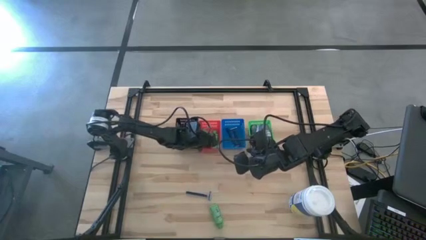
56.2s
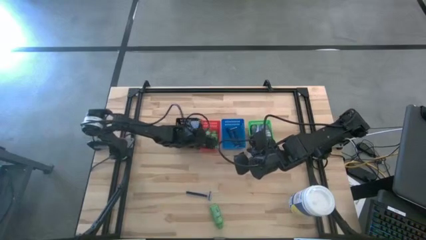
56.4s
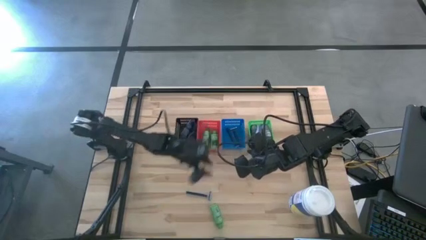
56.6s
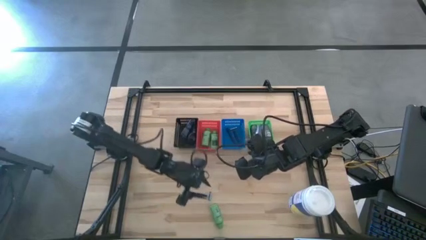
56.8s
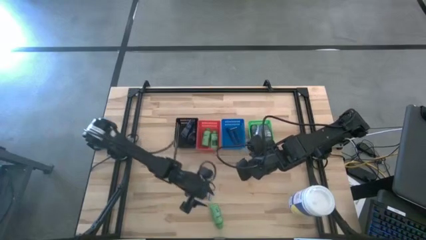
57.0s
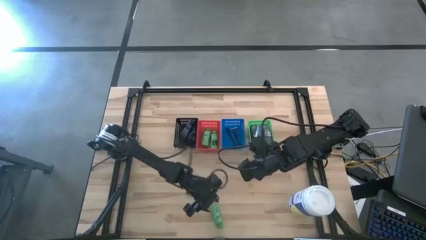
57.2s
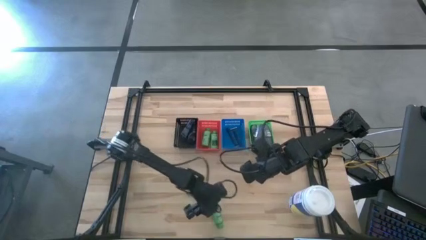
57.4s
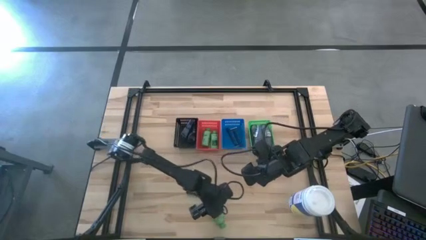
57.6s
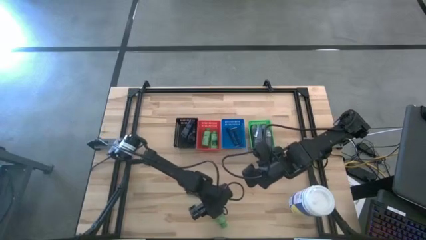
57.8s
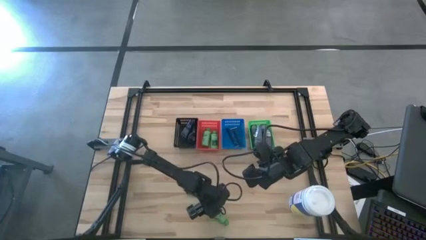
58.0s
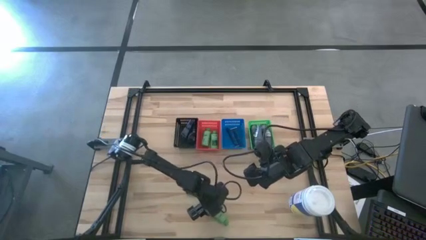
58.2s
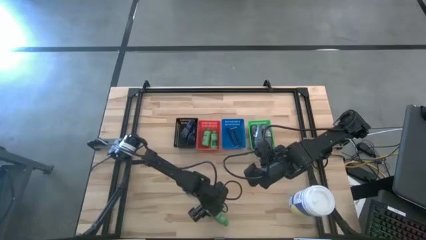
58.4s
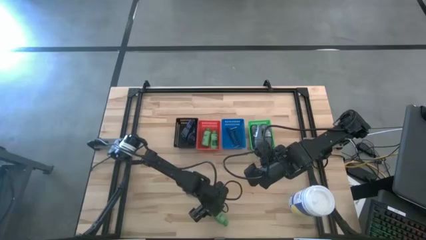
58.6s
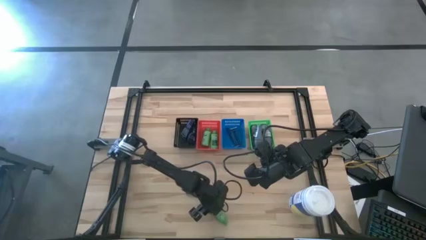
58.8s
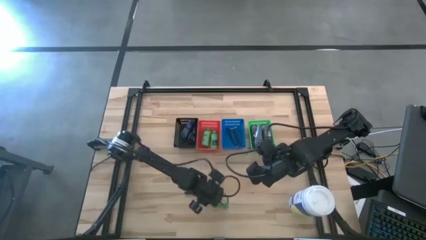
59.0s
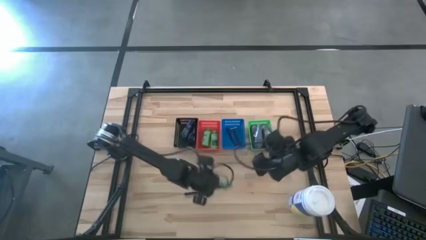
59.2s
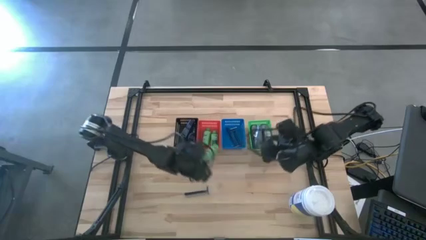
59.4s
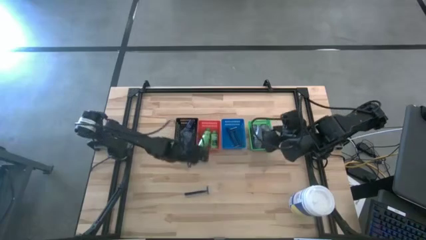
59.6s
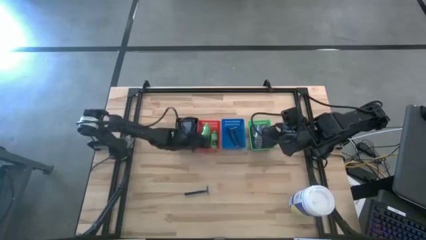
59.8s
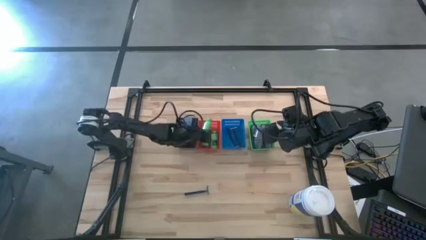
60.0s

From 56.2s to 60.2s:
Task: Pick & Place Travel size toiletries
Put the green shampoo into the red basket

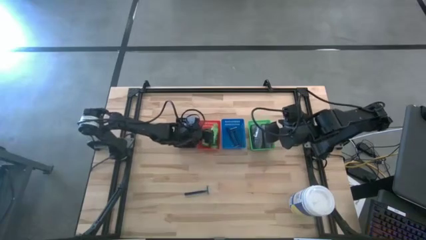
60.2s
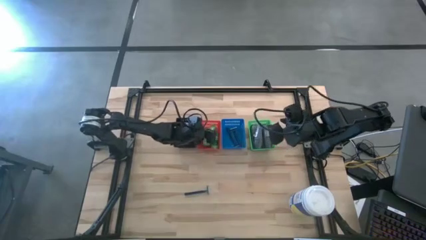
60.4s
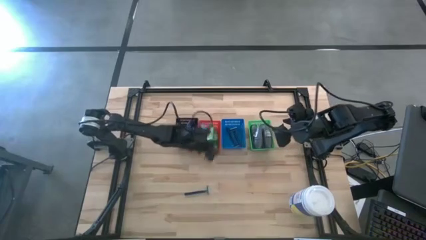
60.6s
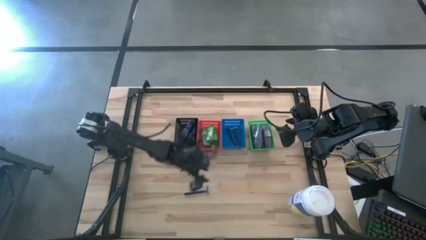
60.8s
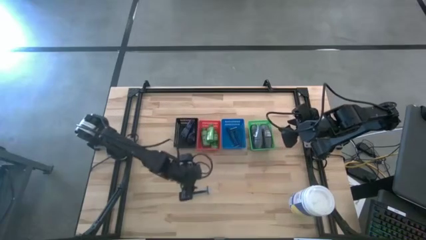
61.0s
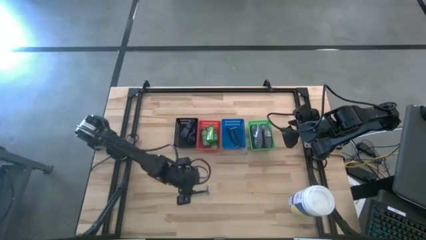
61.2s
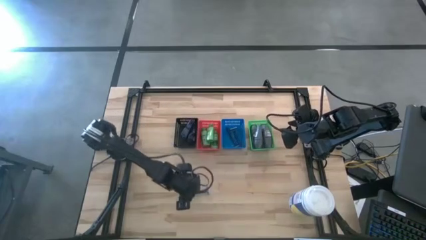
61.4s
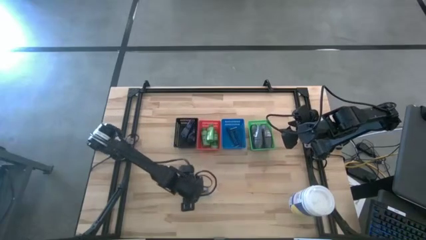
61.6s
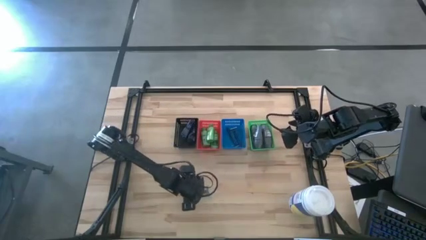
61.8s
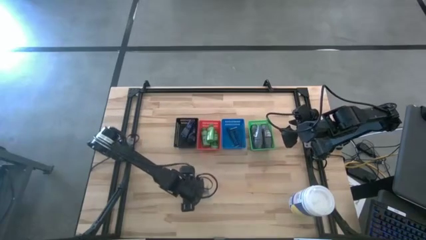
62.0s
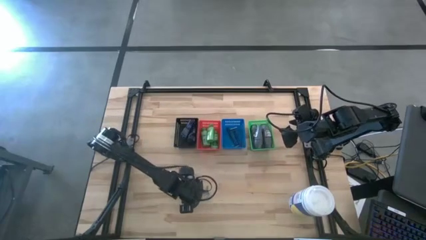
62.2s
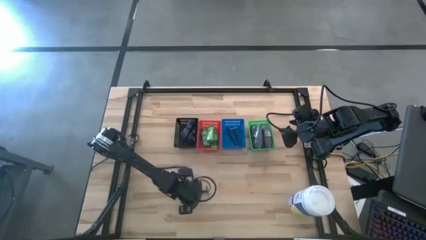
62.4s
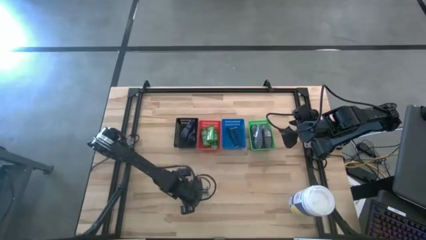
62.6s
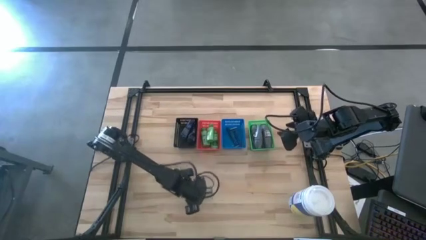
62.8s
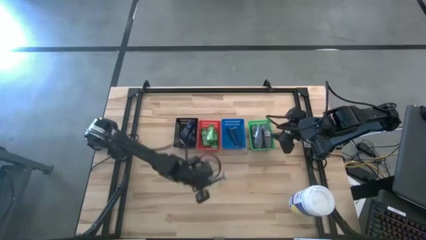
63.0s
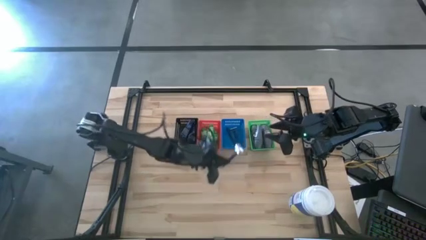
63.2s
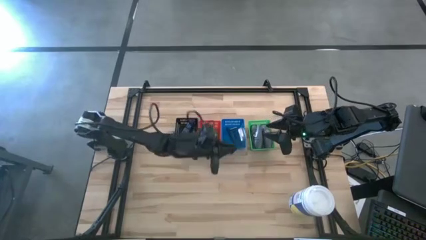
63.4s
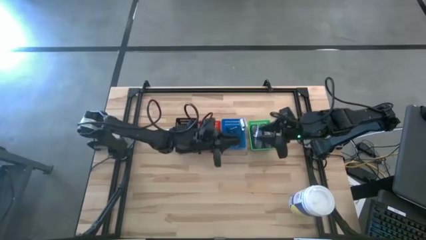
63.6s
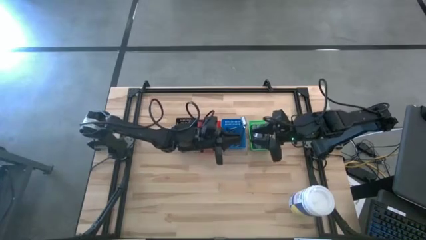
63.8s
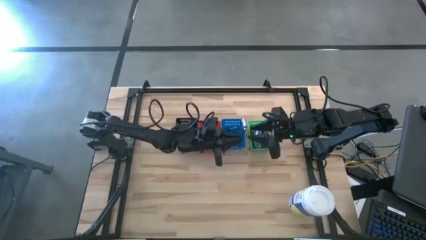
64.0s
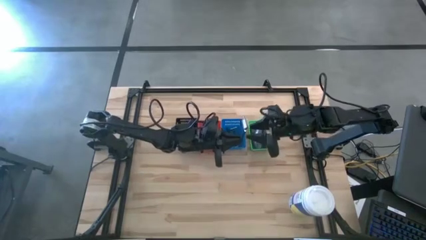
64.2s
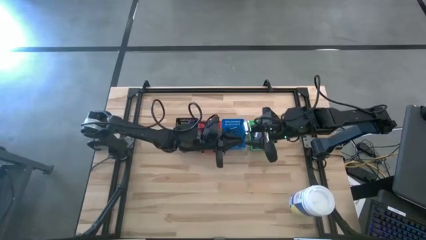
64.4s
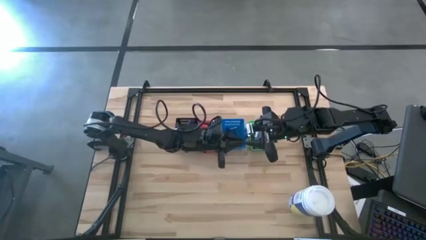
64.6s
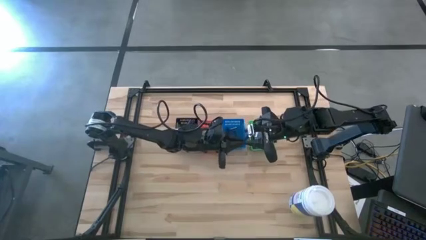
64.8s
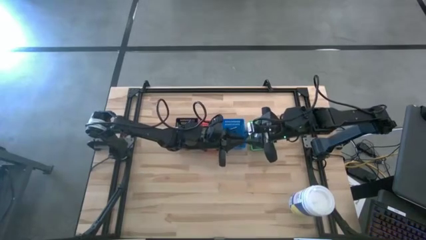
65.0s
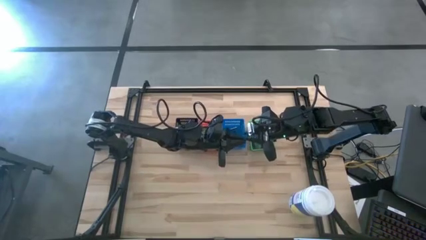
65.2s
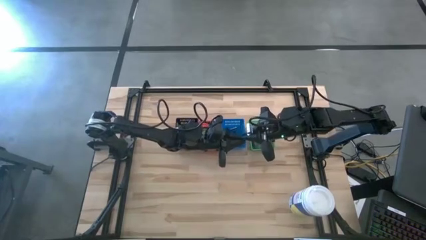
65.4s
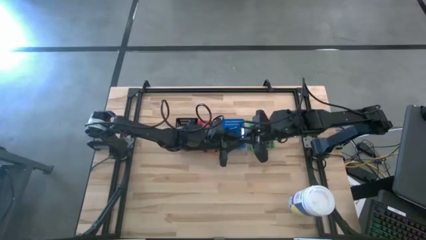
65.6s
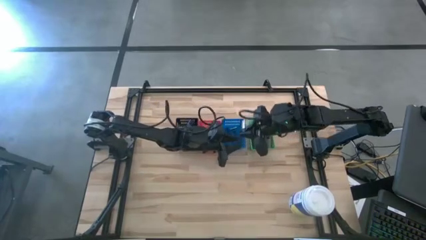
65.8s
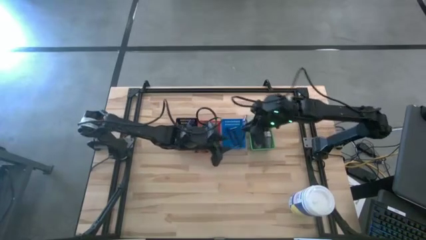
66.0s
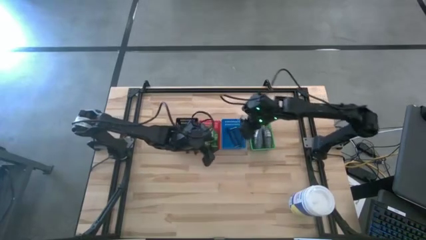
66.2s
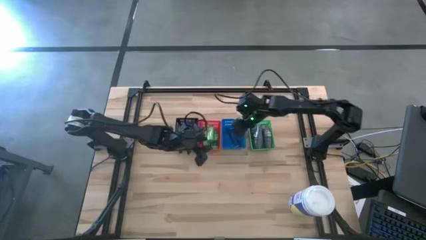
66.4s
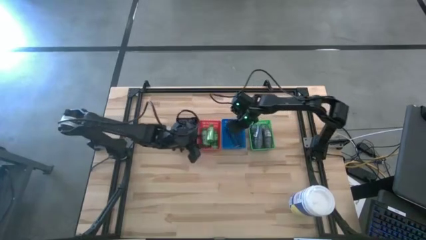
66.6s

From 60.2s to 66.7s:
Put the blue razor into the blue basket

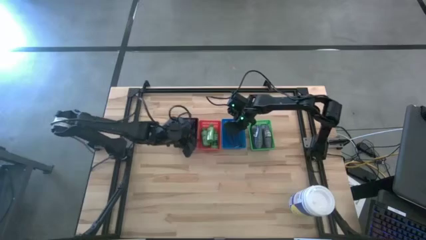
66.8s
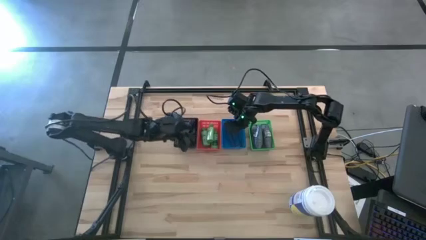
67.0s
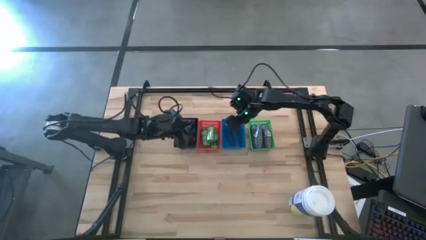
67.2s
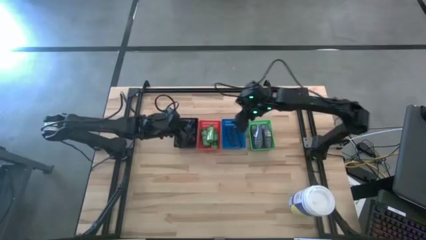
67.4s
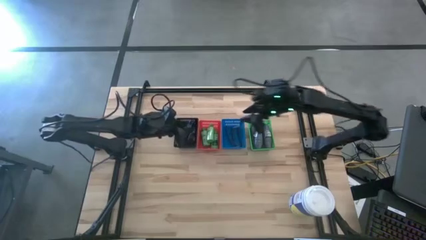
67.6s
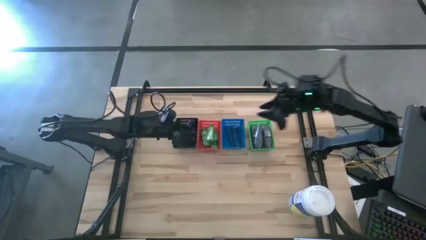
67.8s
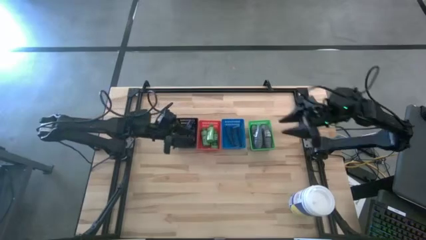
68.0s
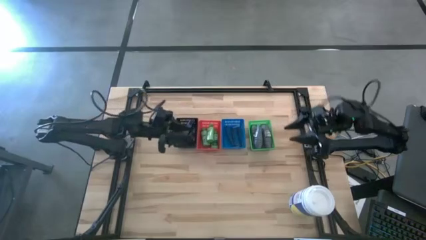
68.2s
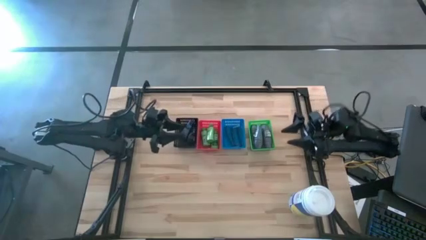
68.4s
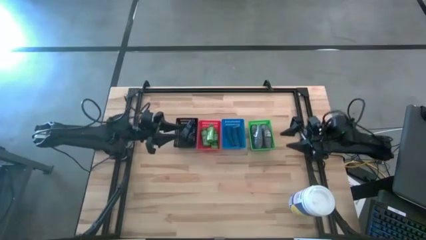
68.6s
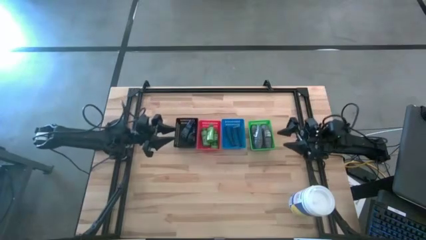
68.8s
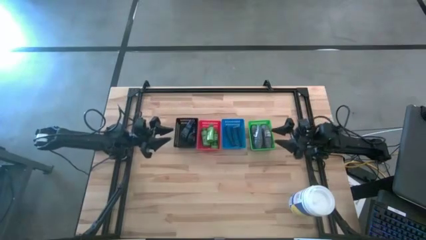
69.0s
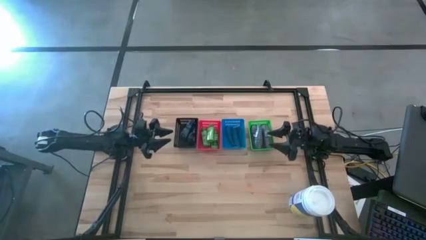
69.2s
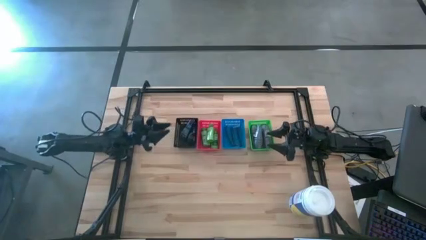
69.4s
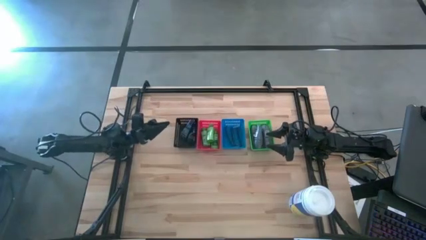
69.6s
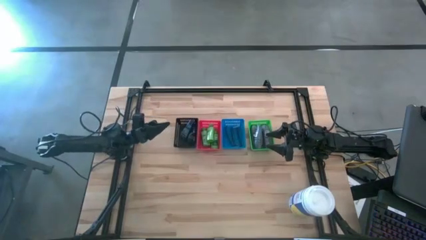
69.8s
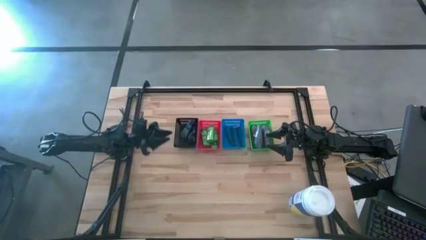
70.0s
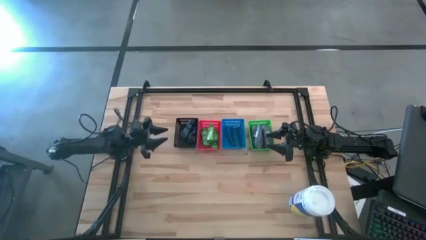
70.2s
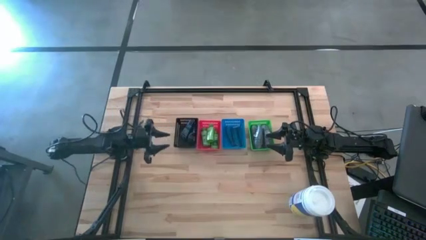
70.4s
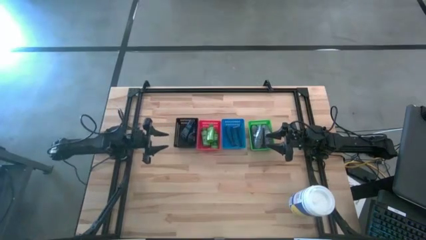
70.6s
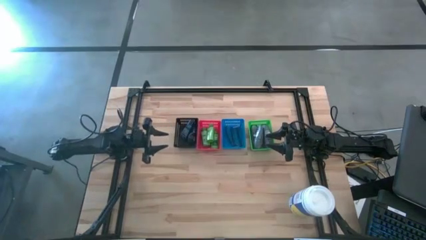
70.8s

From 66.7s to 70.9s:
Return to Home Position

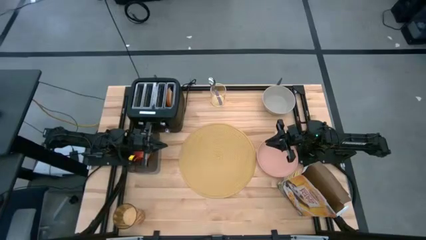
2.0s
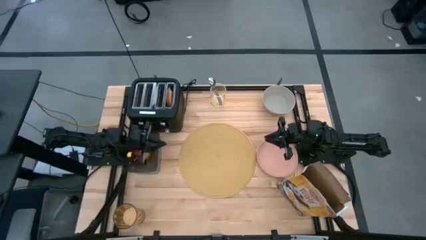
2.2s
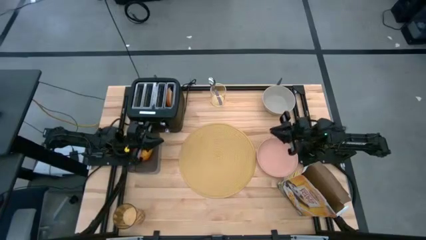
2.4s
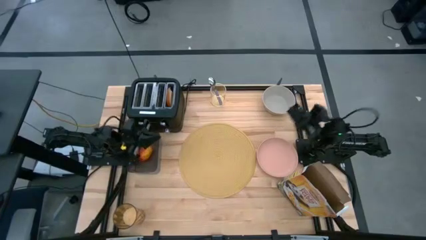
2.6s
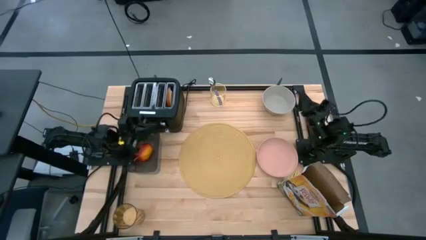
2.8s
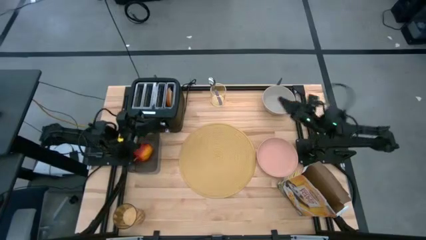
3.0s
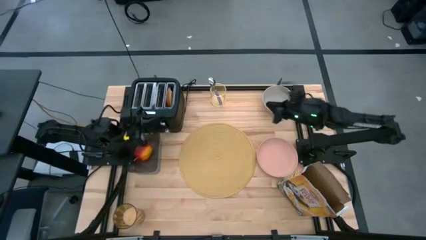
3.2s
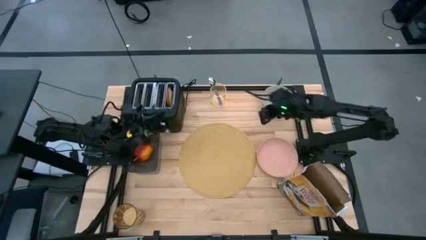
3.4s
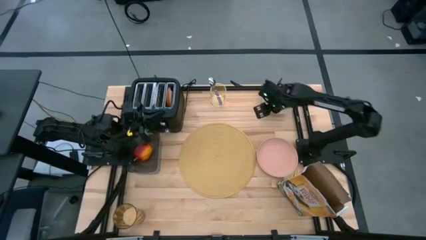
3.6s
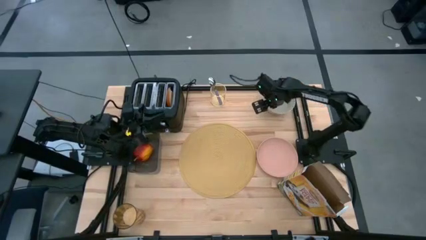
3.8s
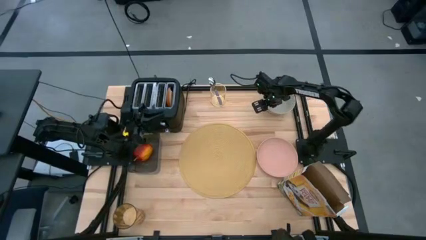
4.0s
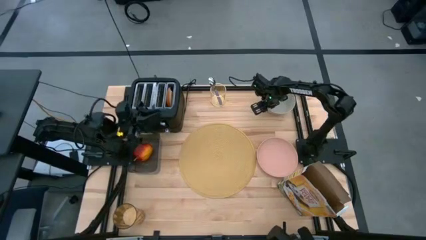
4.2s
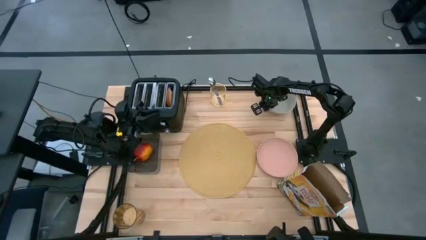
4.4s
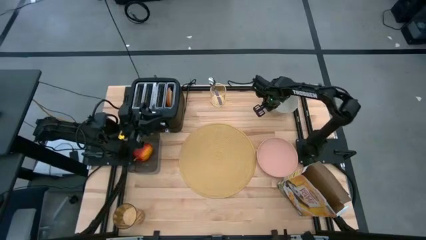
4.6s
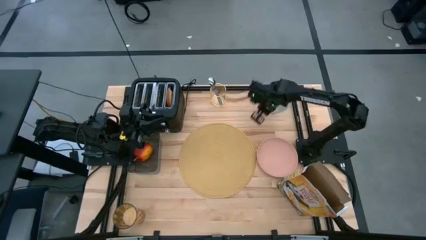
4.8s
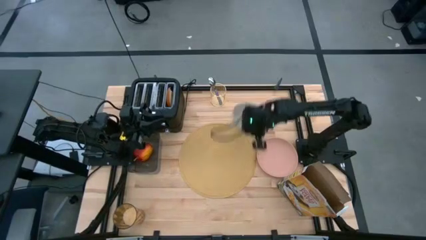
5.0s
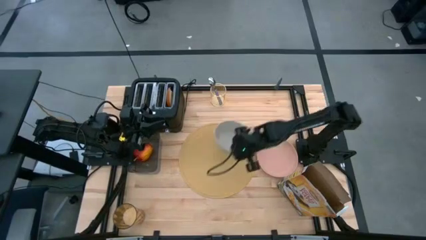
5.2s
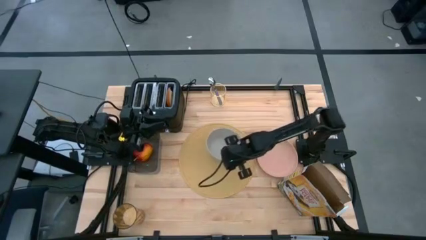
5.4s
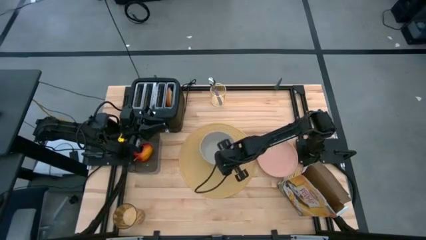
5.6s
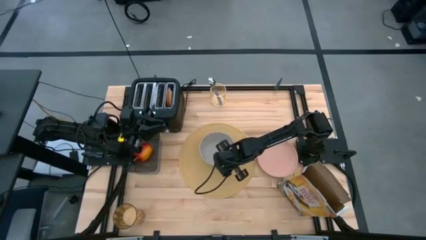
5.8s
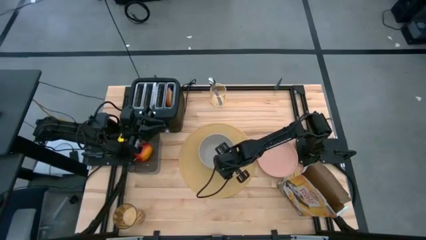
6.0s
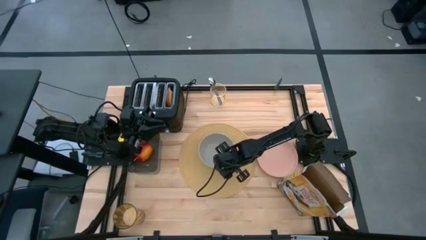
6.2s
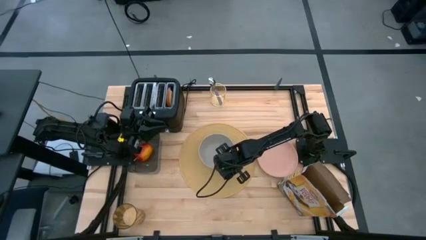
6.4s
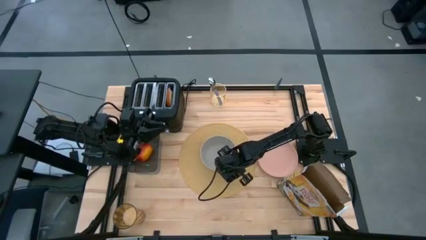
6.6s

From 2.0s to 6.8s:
Task: Arrange a breakfast setting
Put the gray bowl in the middle of the table mat
